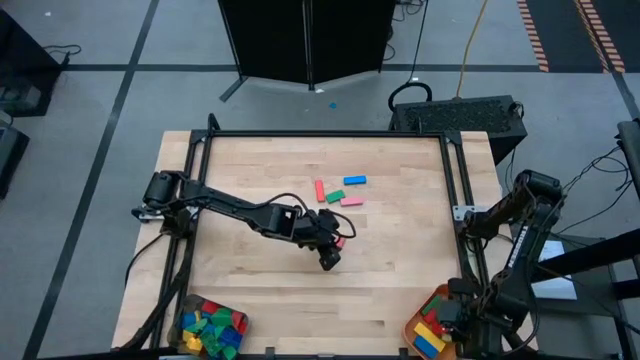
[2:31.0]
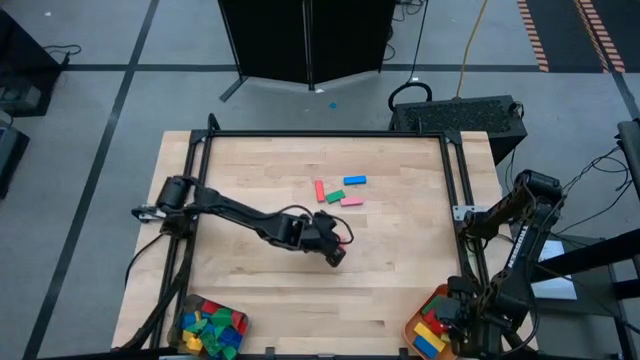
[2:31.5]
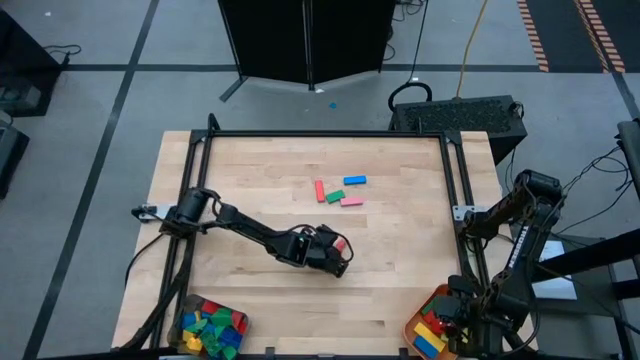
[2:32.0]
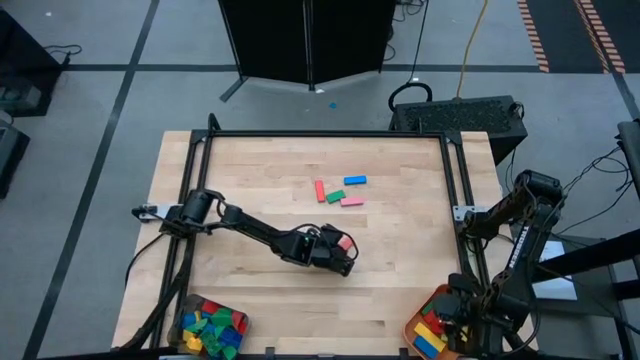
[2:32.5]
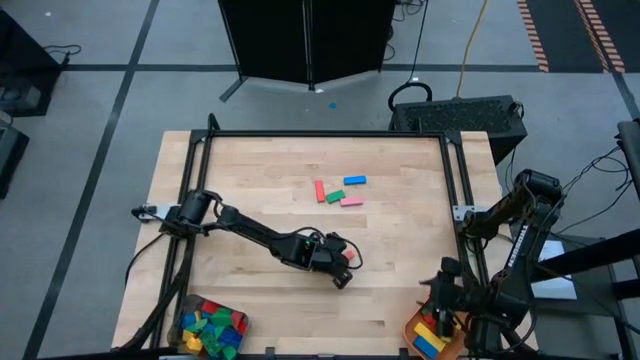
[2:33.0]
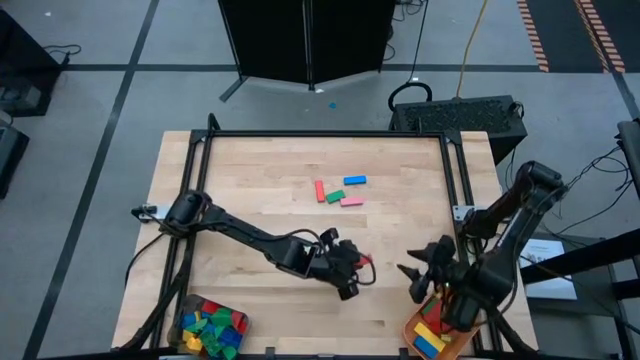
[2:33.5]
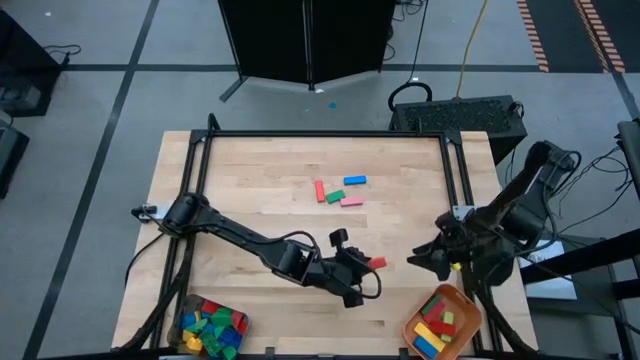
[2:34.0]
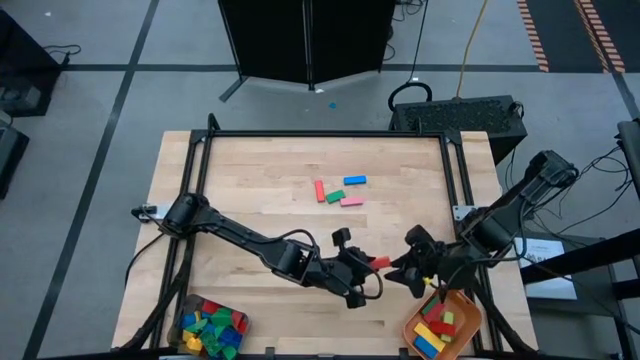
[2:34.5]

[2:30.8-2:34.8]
Task: Sort blocks by size
Put the red rectangular block into the orange bin

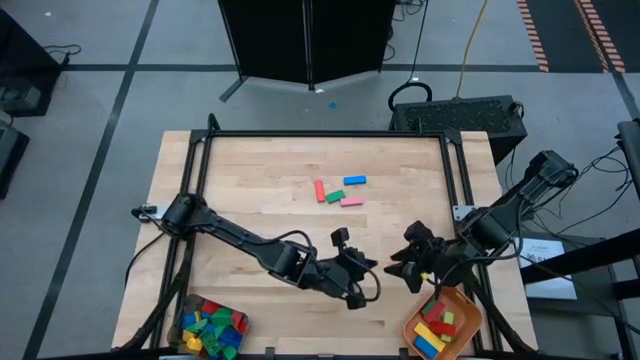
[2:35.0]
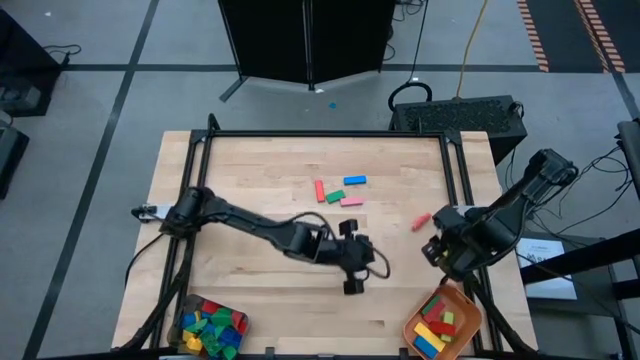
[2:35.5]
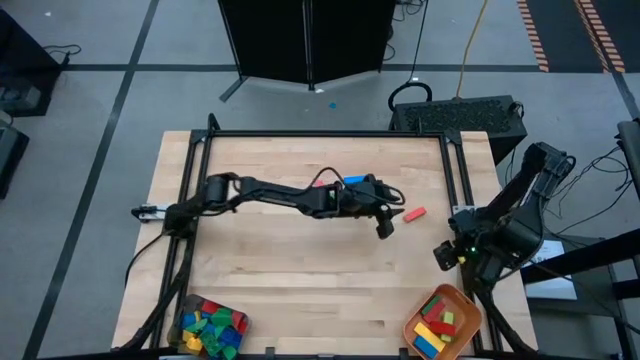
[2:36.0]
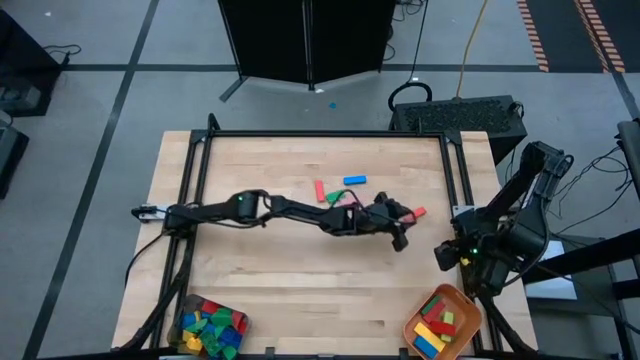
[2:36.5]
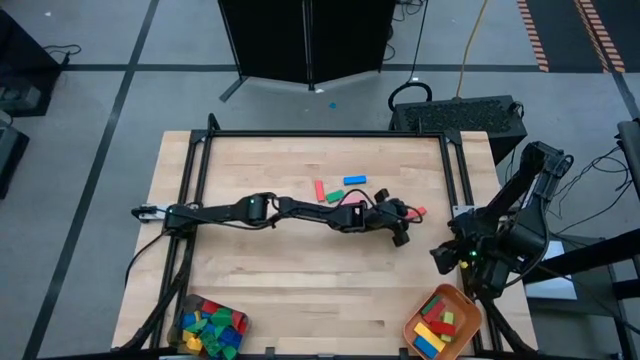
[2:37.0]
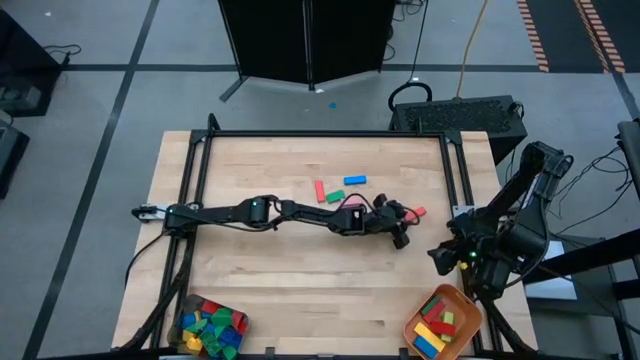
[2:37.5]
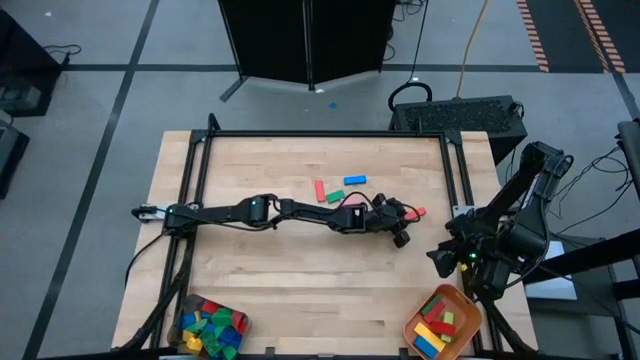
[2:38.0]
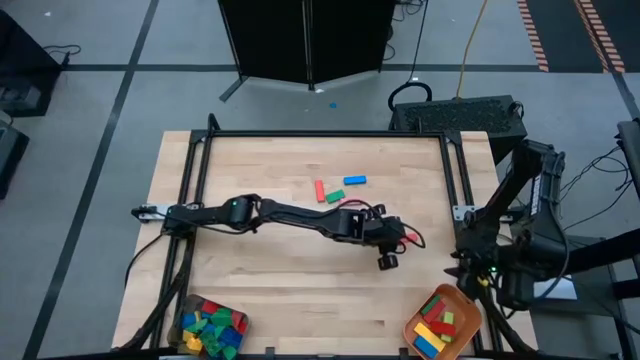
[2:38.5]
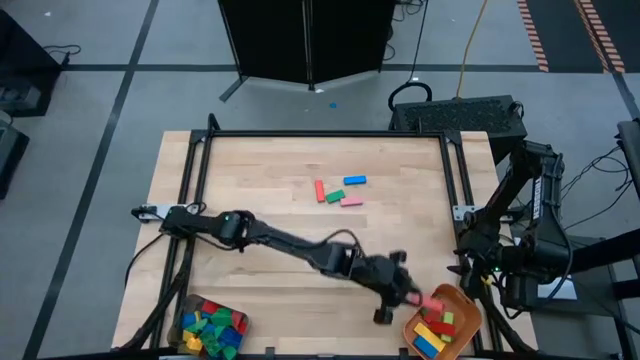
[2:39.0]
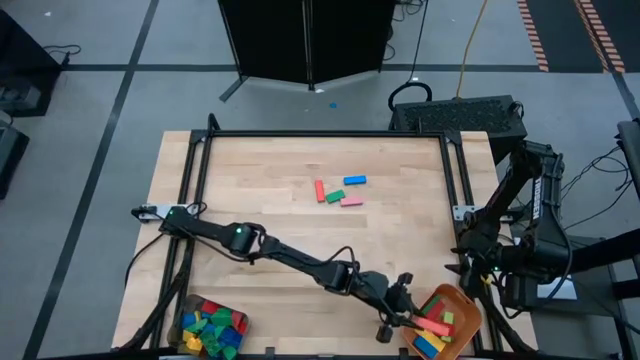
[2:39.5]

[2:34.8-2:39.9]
Put the red rectangular block into the orange bin

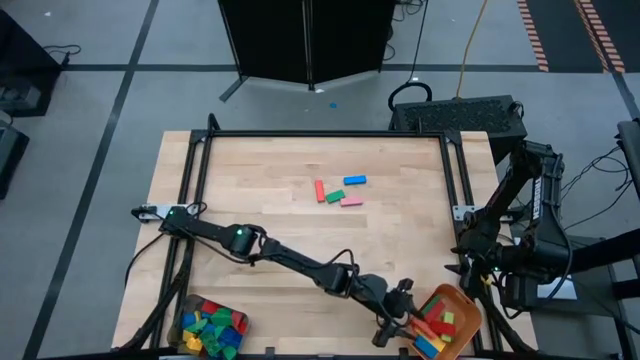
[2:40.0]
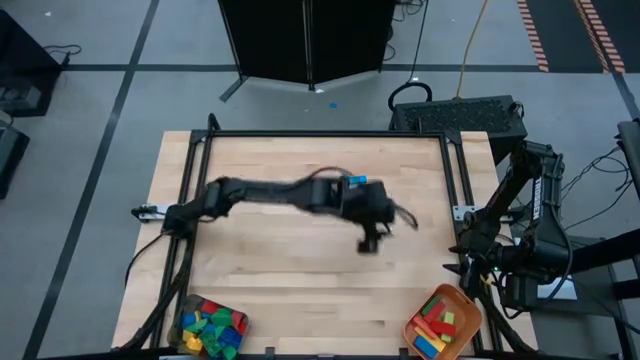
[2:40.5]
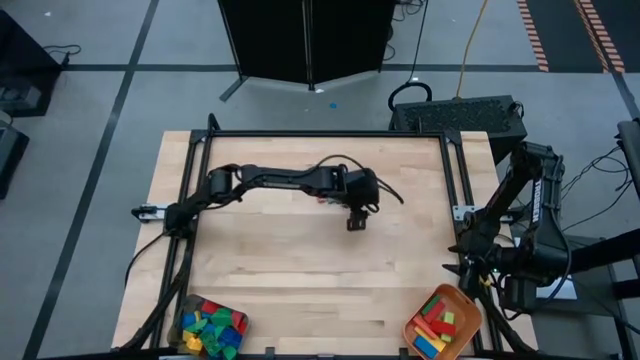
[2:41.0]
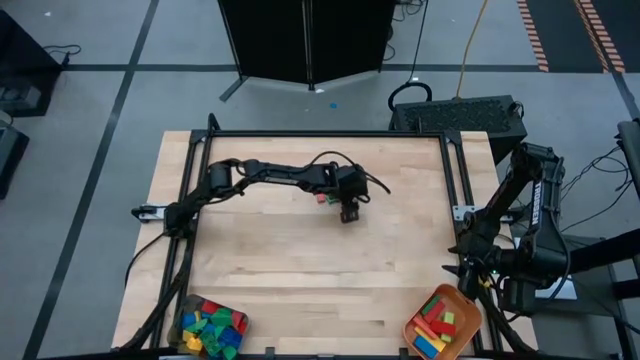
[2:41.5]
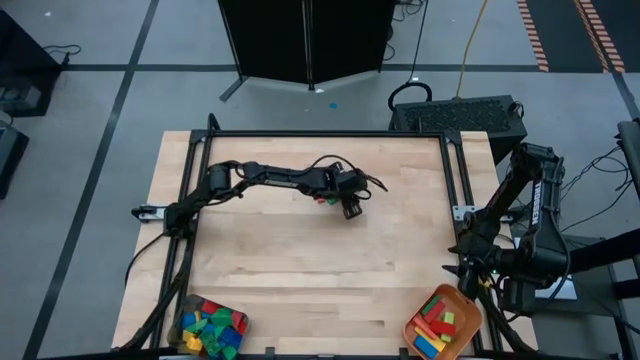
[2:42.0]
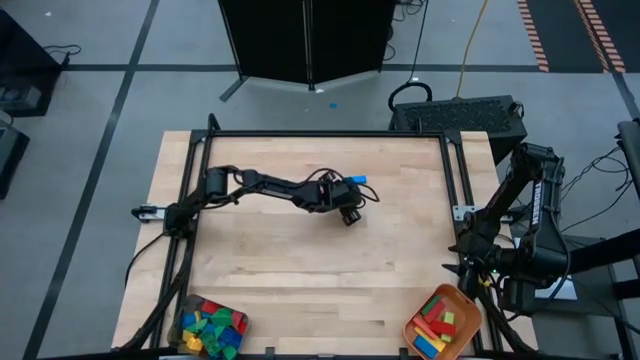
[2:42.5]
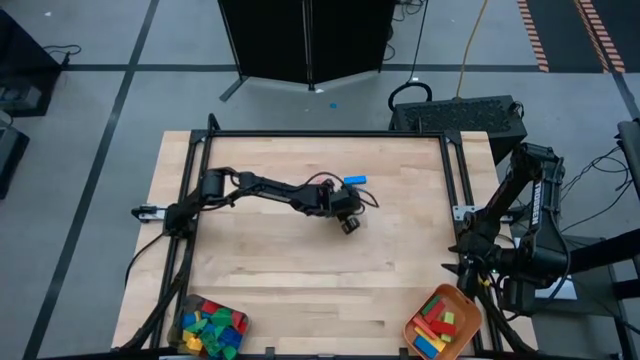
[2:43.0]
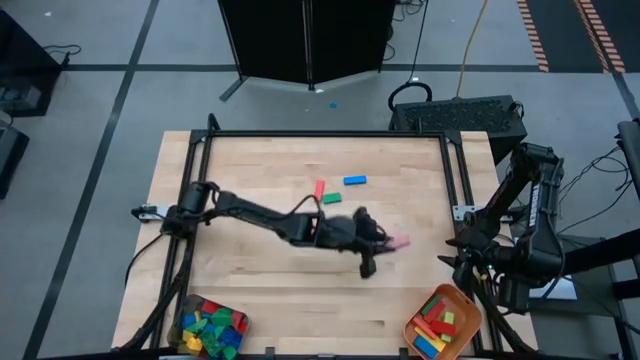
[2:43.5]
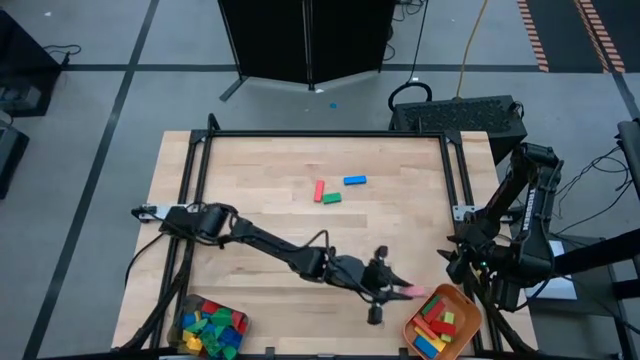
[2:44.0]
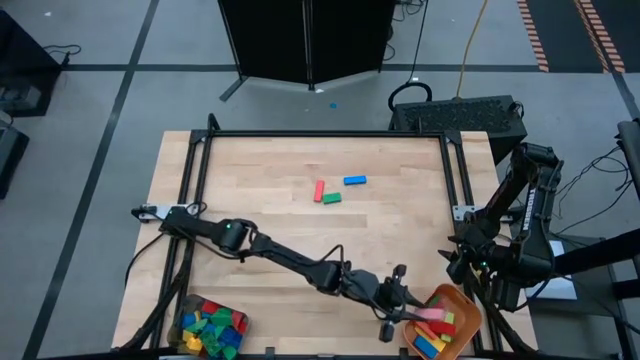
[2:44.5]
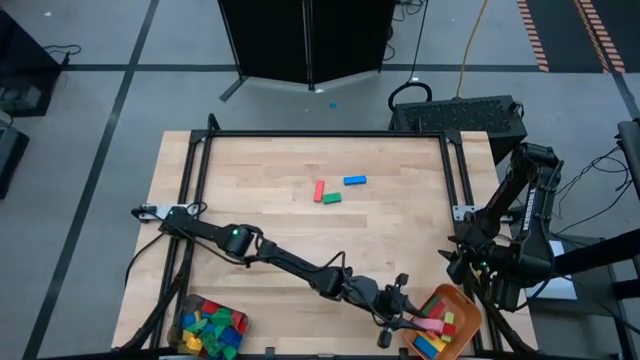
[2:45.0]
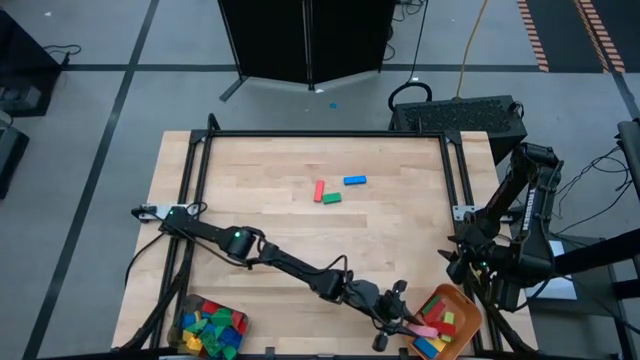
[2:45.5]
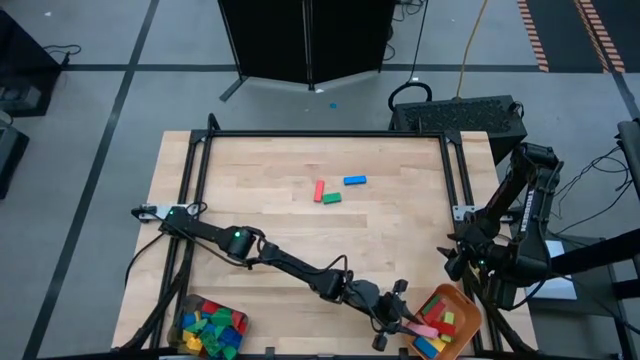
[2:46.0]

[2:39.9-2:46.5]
Put the pink rectangular block into the orange bin

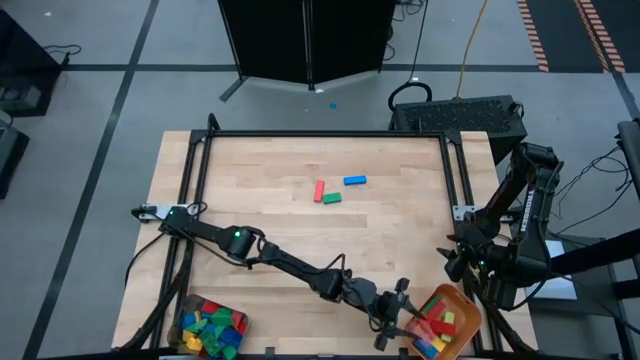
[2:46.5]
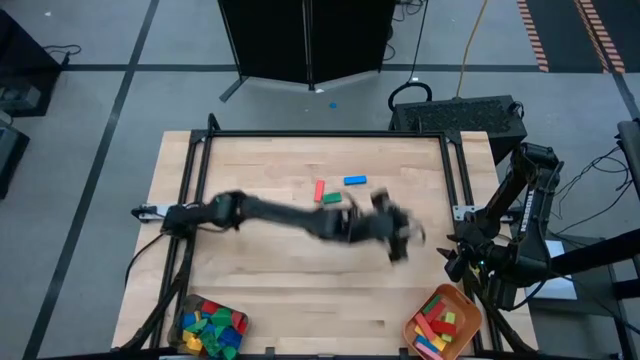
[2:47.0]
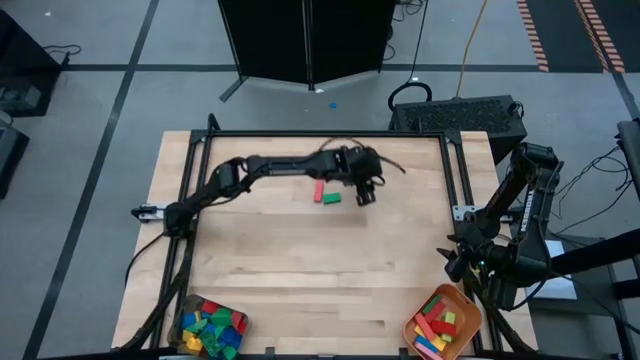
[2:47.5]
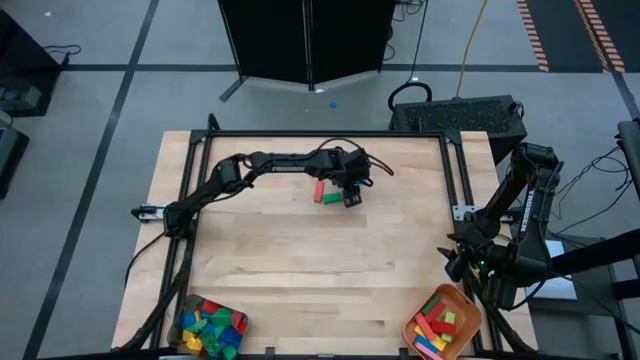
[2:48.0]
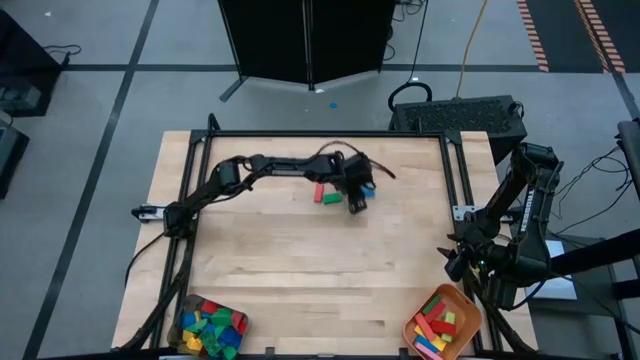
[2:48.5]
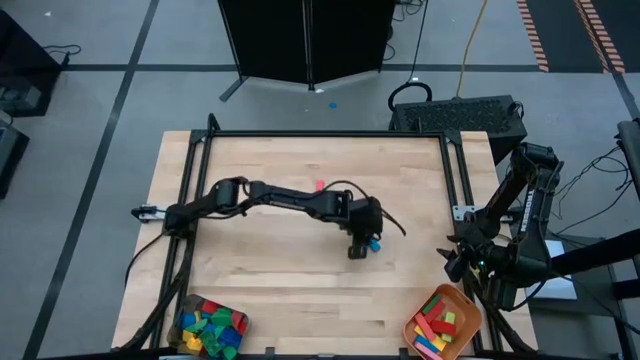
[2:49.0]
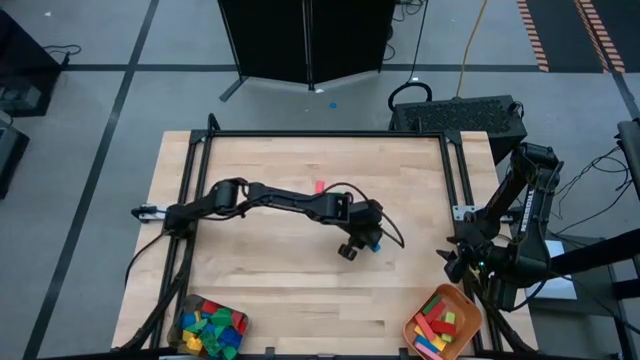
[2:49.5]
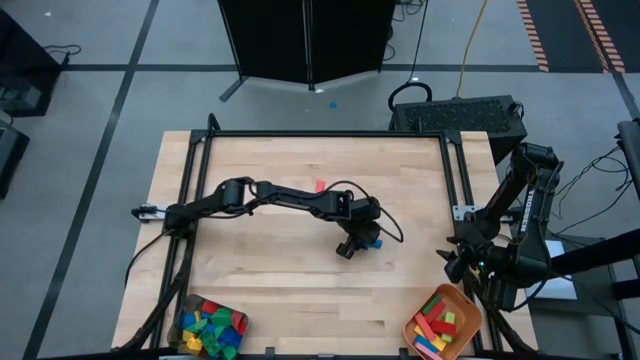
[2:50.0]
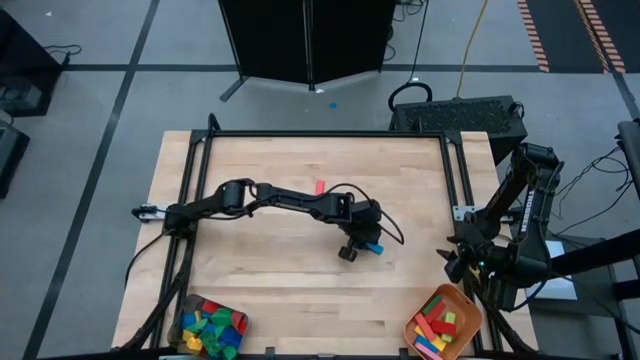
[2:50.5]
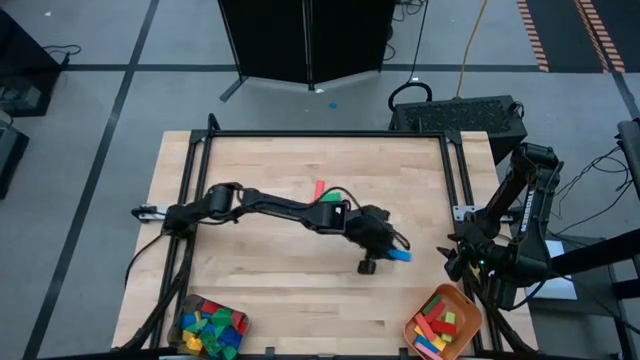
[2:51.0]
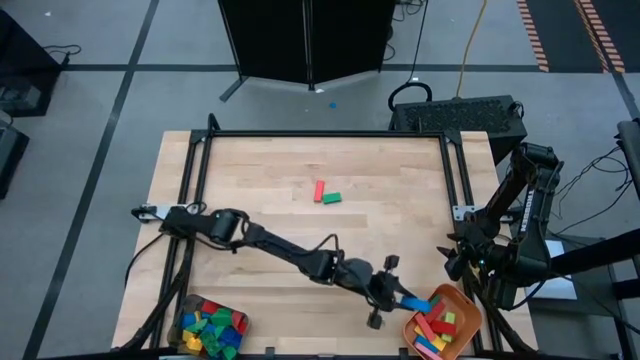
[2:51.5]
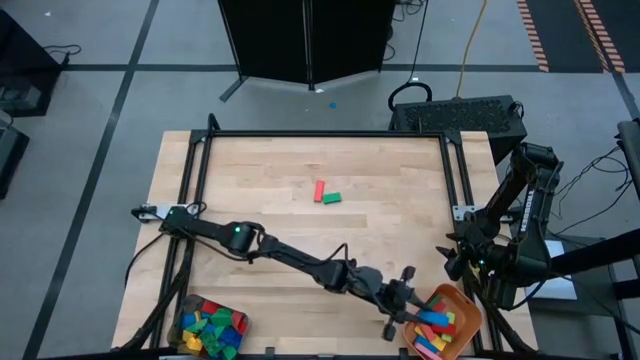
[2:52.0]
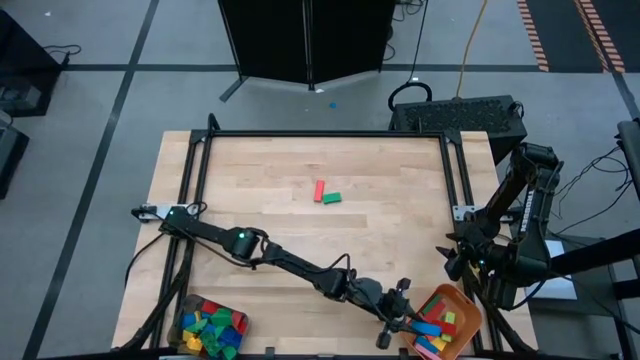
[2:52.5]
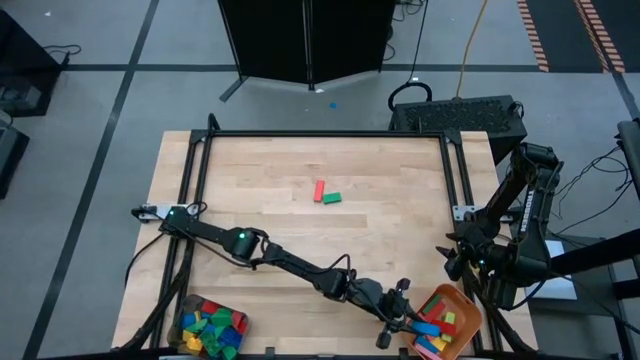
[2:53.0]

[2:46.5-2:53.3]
Put the blue rectangular block into the orange bin
